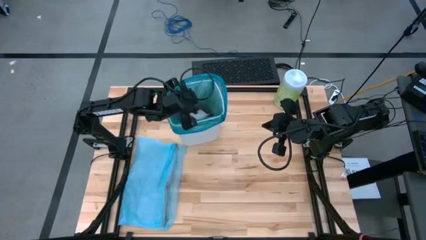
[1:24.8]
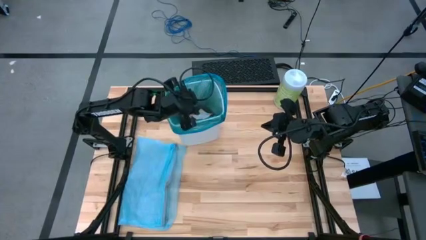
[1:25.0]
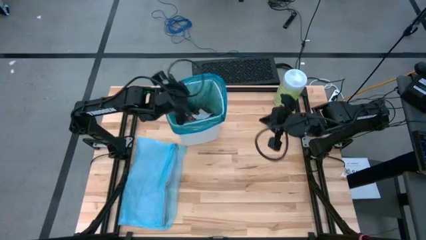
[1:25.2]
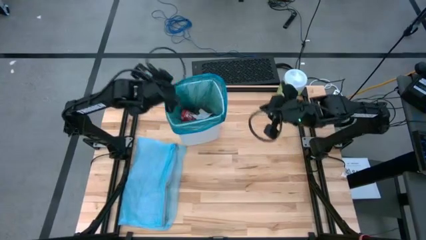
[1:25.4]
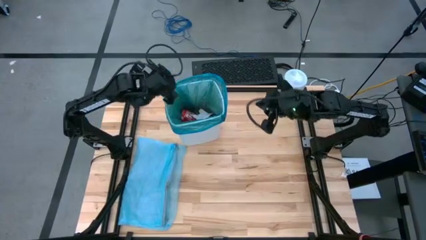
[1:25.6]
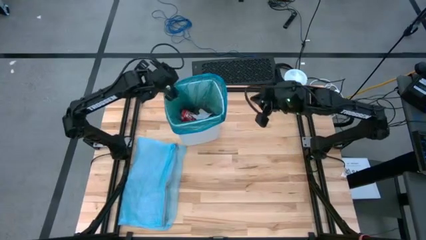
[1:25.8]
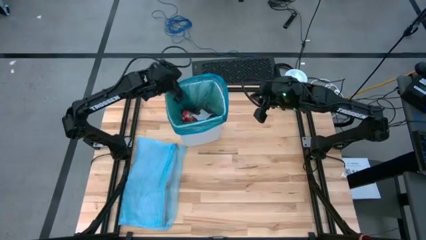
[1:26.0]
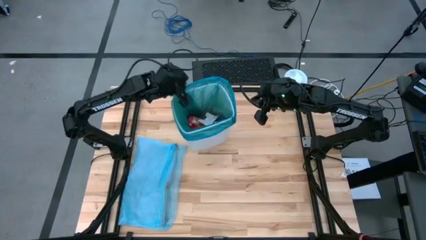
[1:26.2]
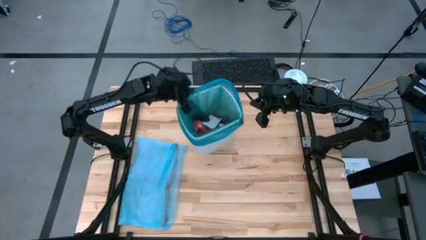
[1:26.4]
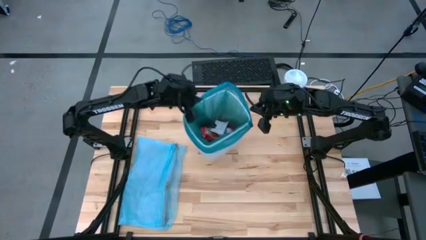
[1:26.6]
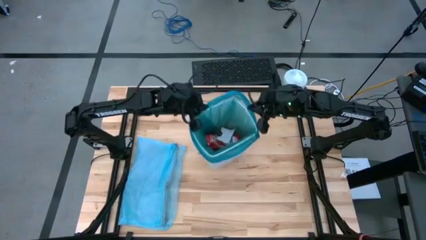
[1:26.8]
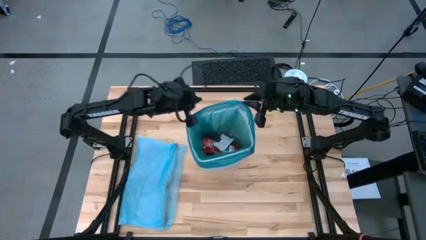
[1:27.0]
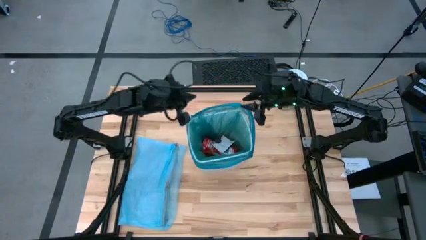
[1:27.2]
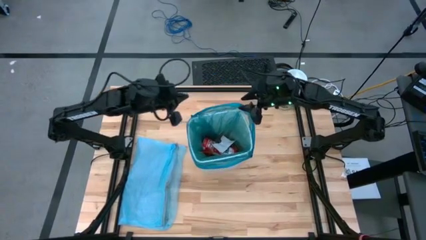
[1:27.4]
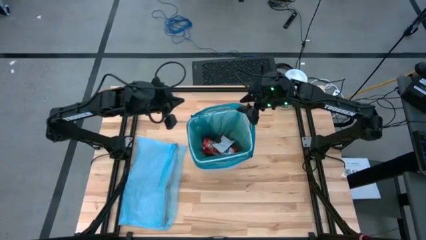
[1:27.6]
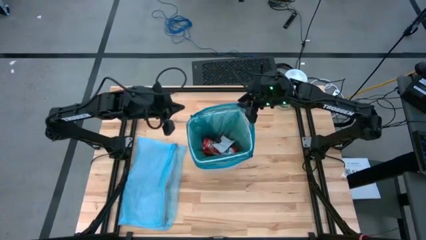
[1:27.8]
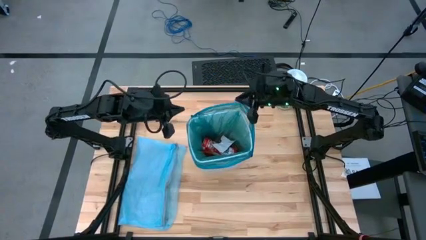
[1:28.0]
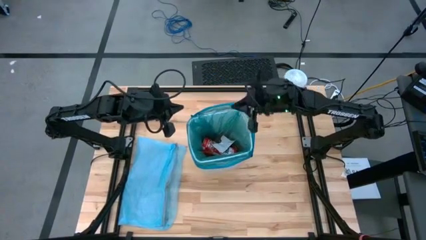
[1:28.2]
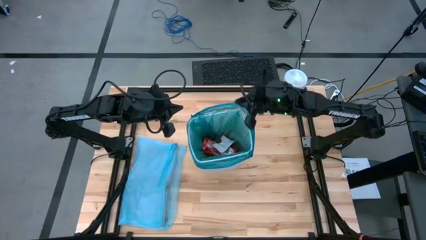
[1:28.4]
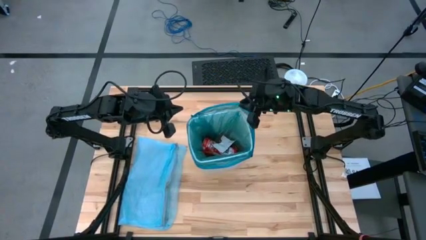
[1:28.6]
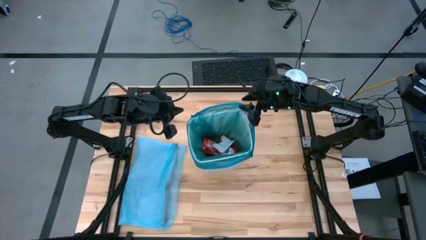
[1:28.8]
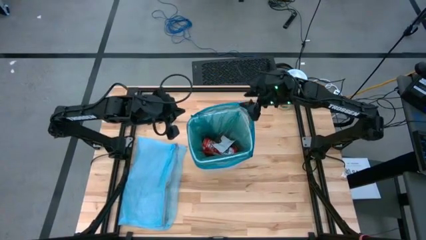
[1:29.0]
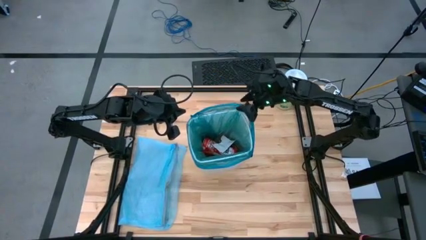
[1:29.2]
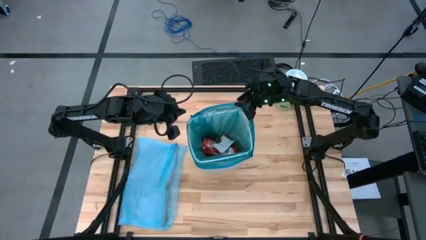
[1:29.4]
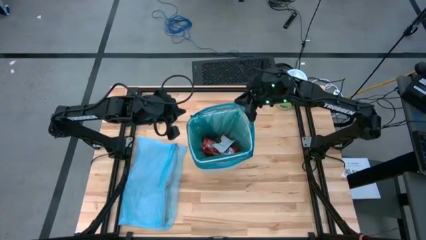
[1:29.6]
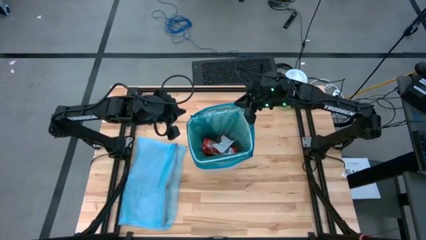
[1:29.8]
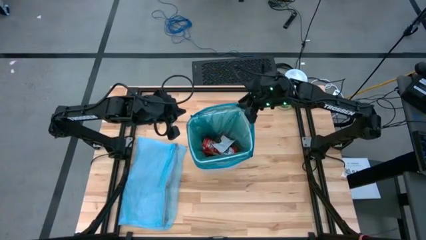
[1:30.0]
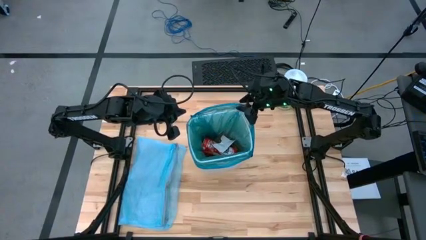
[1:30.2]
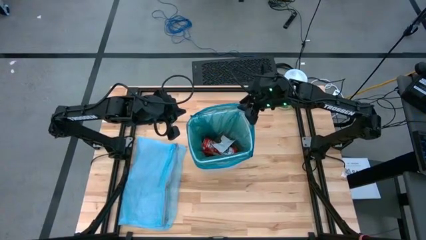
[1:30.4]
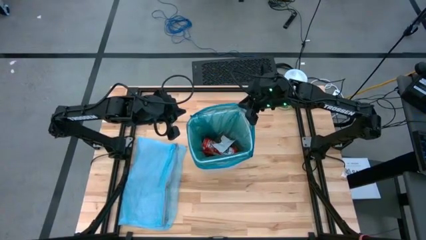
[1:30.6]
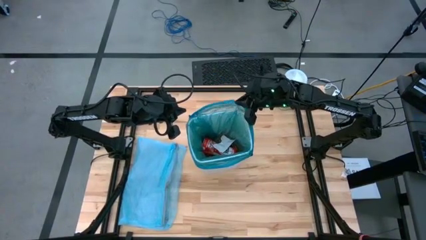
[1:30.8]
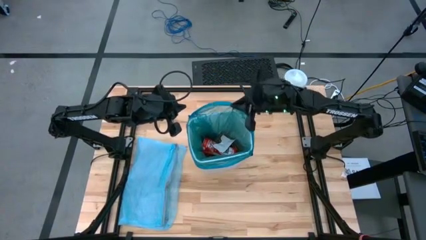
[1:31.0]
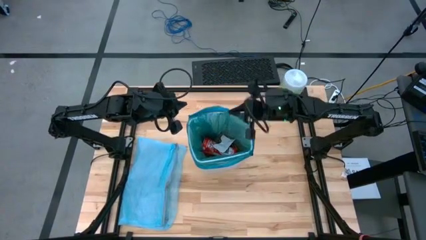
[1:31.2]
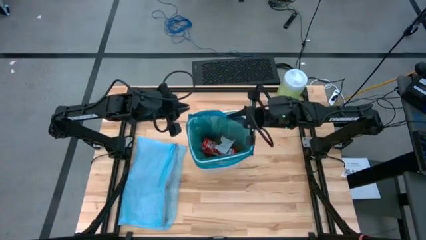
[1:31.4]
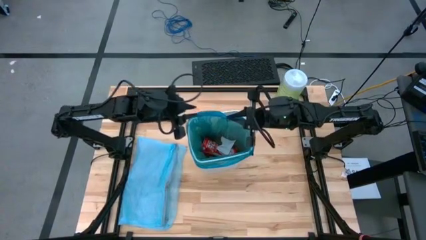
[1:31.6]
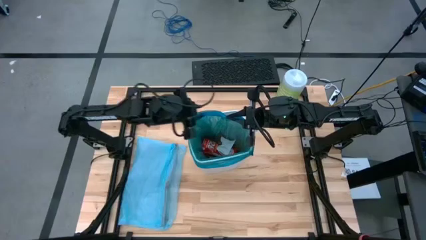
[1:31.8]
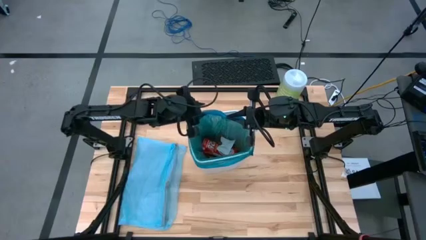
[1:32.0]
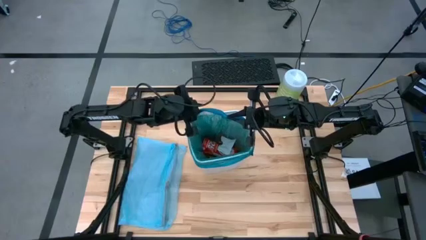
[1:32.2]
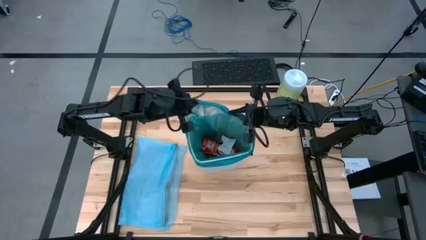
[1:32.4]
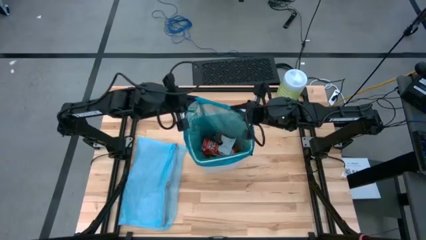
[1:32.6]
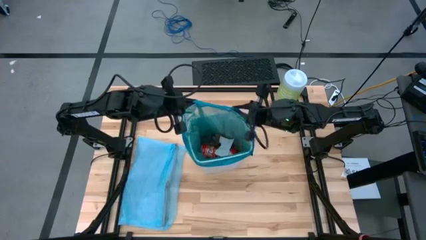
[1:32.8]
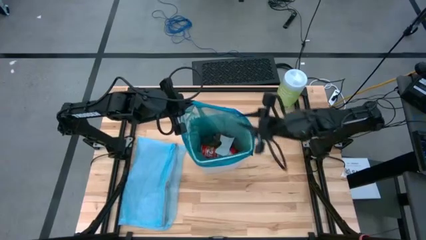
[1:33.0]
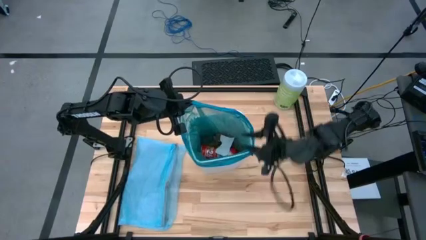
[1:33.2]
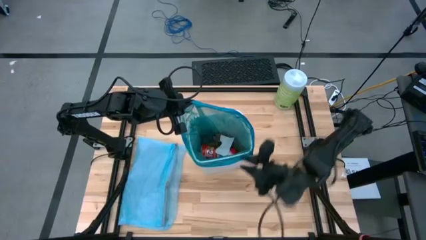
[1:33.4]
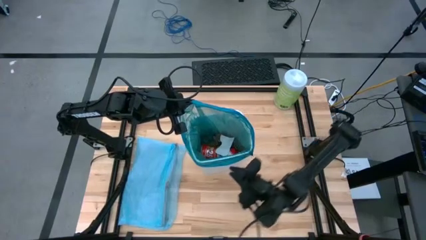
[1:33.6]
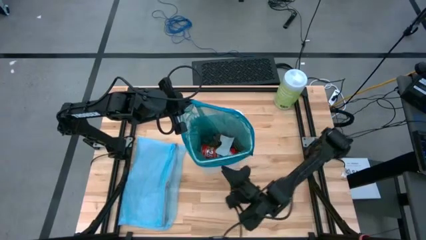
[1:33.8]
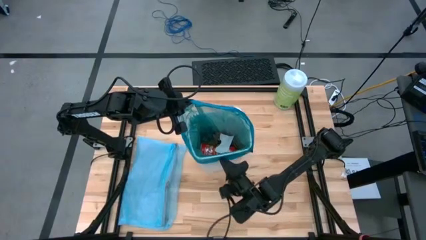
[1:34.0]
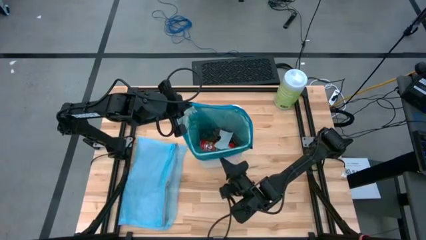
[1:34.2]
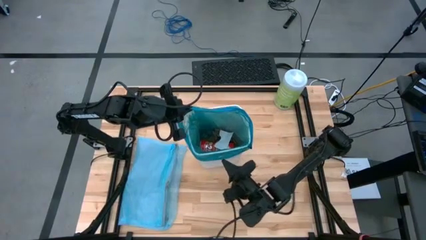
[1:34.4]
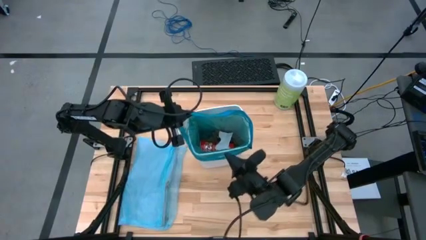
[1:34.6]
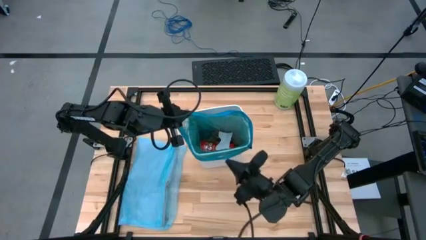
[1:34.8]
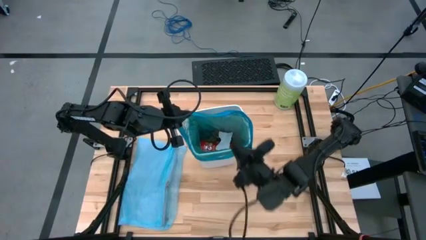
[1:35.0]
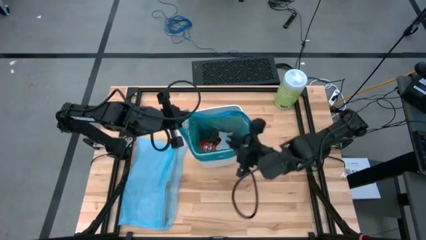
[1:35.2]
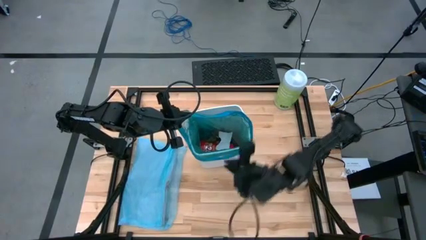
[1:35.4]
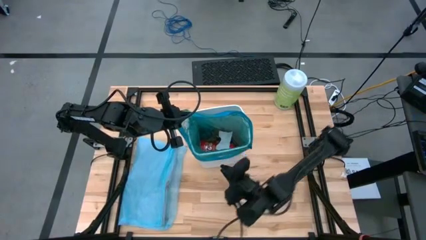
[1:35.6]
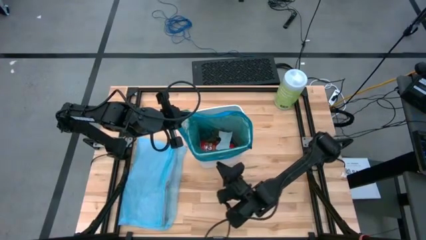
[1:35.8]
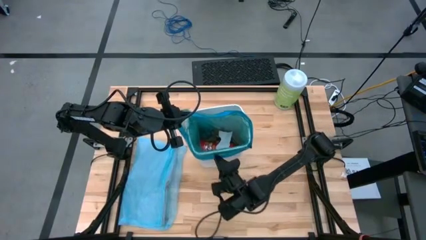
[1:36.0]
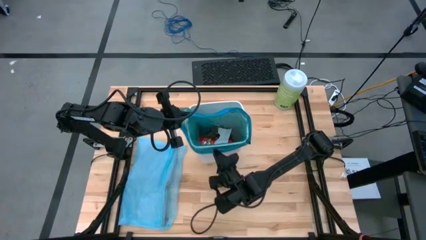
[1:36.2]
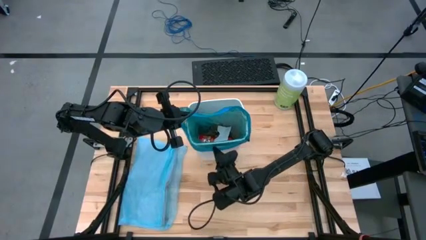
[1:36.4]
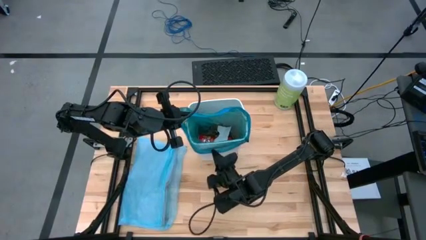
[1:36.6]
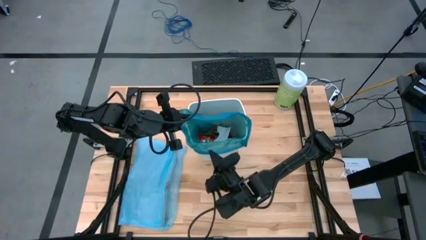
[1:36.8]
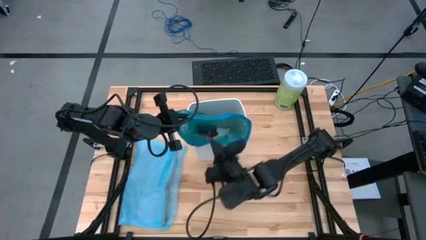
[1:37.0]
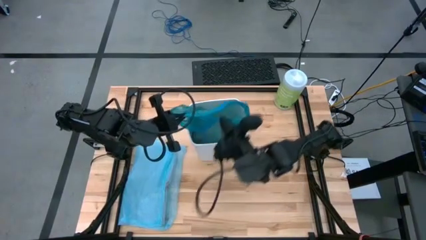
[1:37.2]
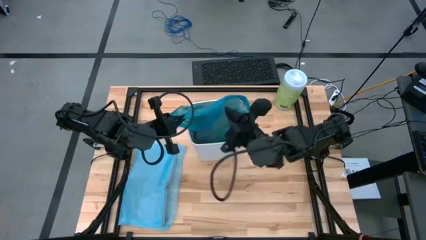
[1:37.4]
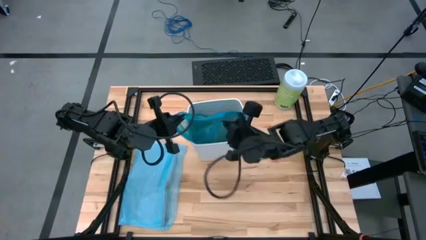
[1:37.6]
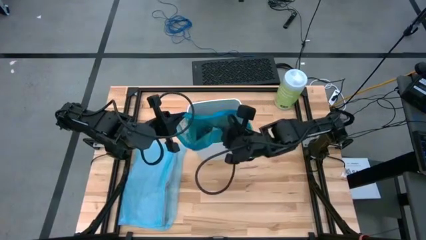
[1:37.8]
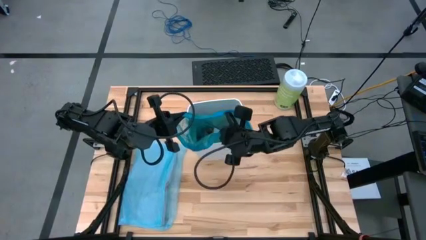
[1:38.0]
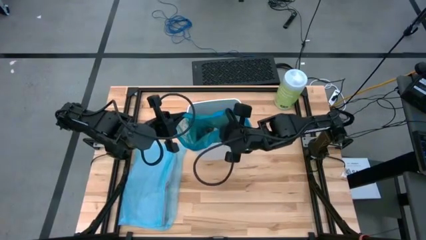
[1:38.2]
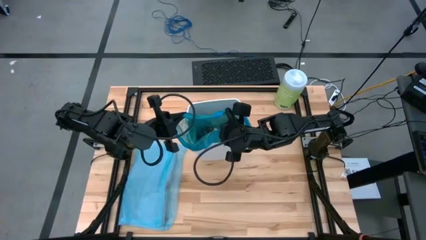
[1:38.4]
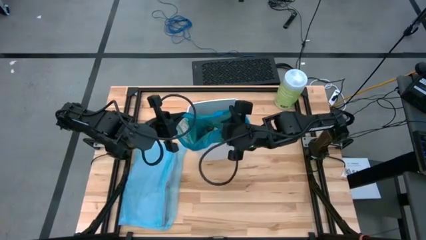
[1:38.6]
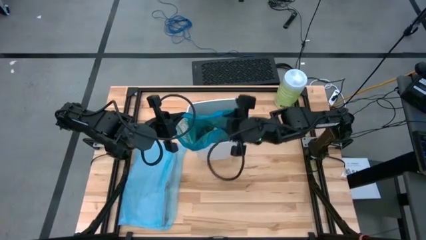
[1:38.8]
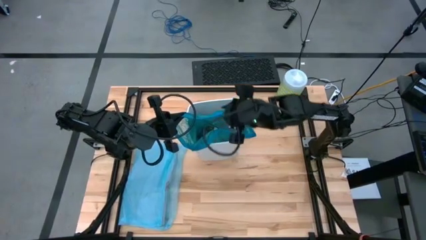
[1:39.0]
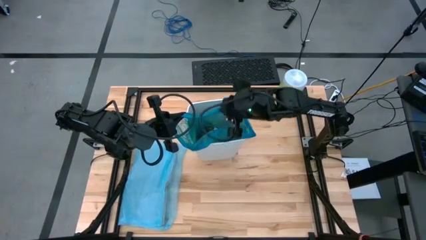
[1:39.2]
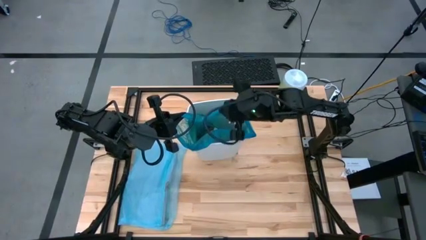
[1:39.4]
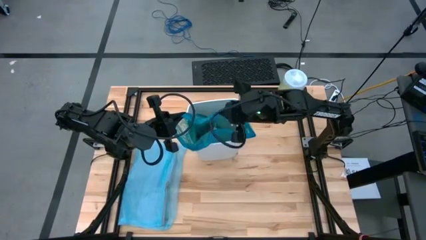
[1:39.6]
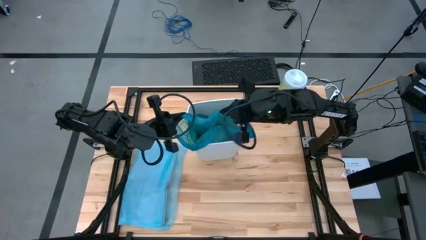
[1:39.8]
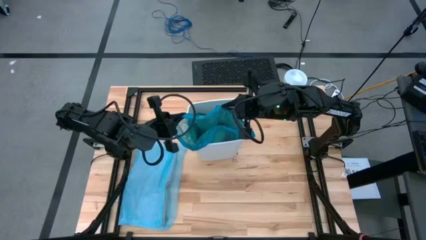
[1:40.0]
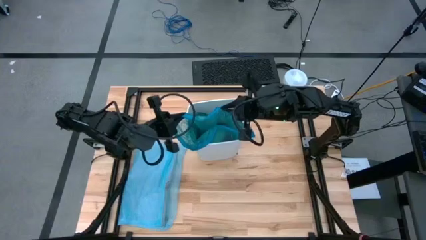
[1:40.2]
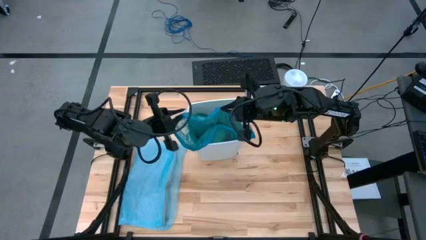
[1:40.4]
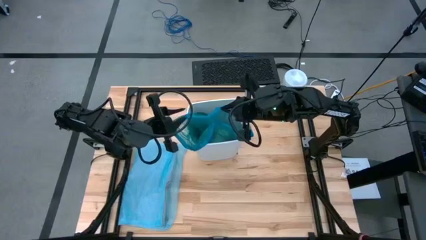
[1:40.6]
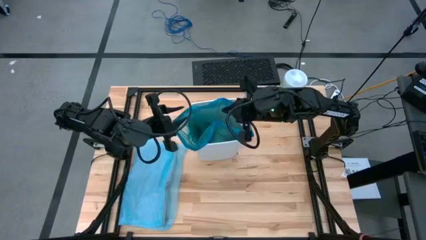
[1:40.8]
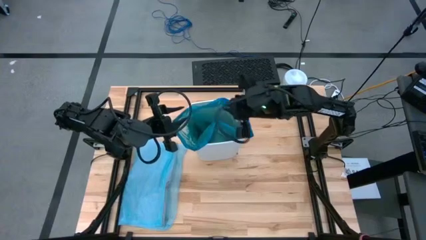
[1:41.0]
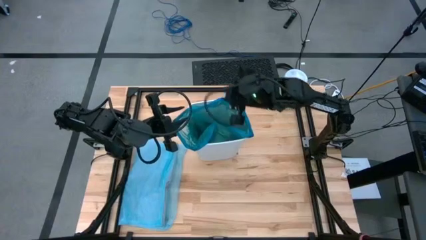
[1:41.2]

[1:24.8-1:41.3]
Task: place trash/remove bag and relplace
Remove the blue trash bag from the white trash bin

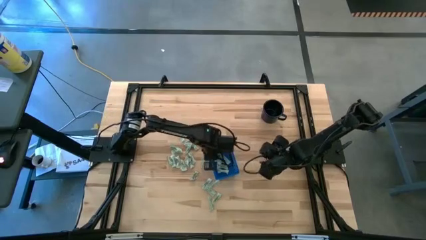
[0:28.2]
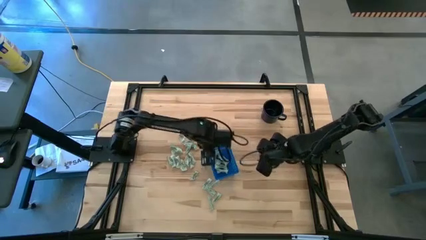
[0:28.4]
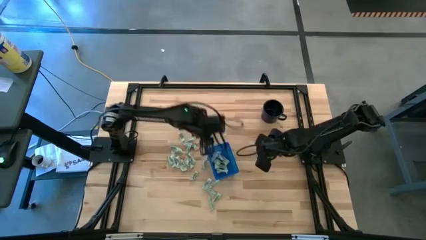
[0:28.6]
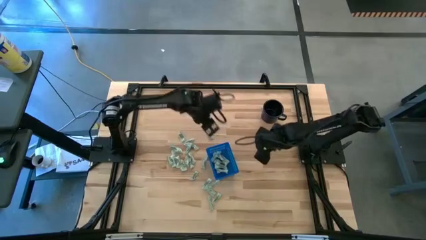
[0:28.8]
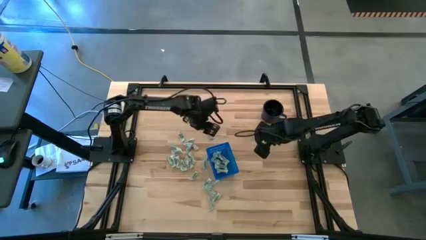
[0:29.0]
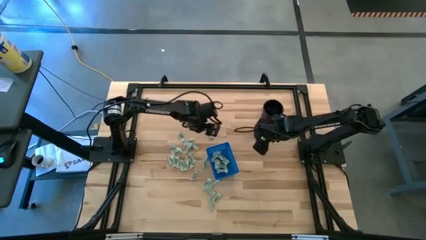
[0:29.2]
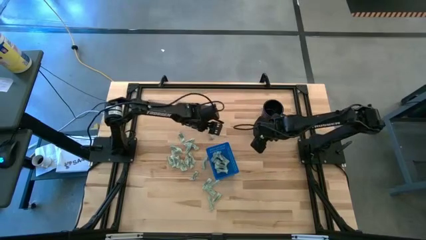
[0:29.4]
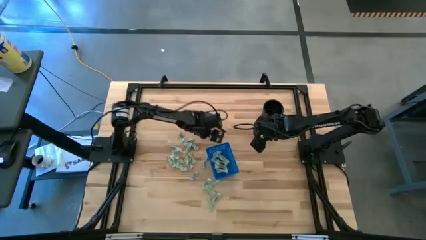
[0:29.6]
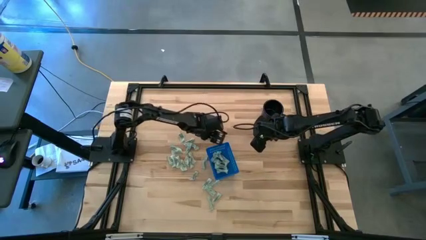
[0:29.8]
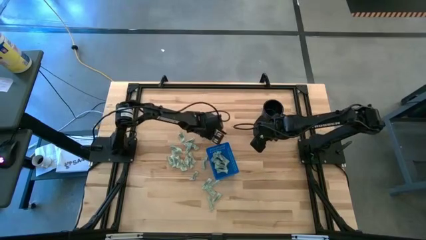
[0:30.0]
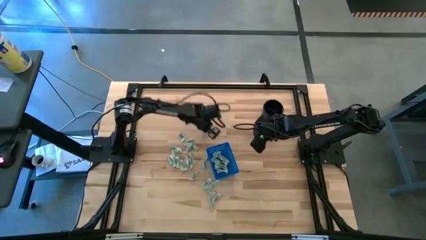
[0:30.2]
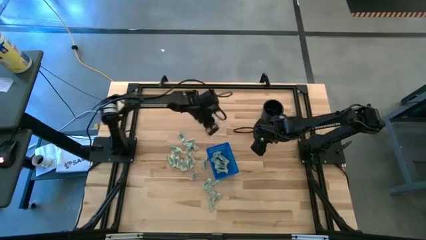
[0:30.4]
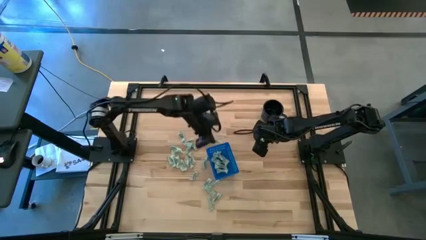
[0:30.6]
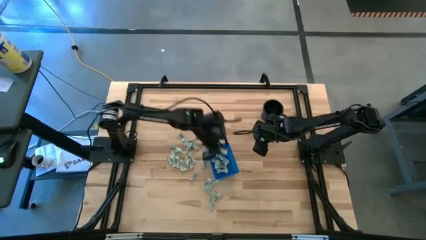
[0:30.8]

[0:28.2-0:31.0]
Task: Pick and place Stevia / Truvia into bins
Put the stevia packet into the basket
